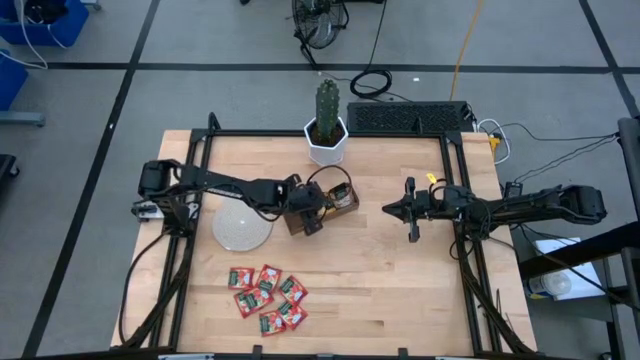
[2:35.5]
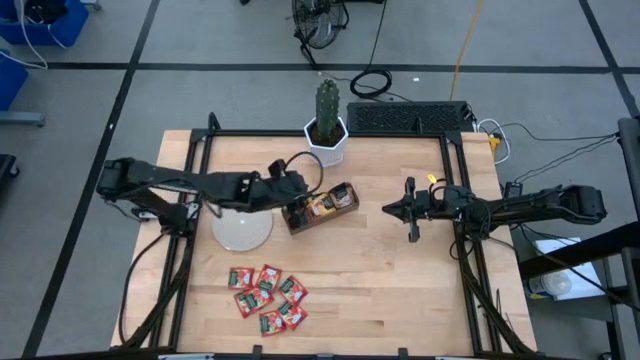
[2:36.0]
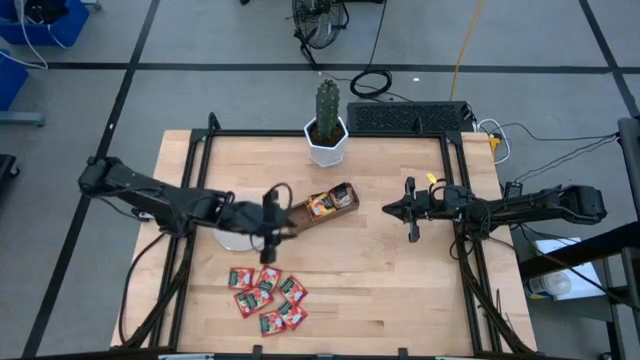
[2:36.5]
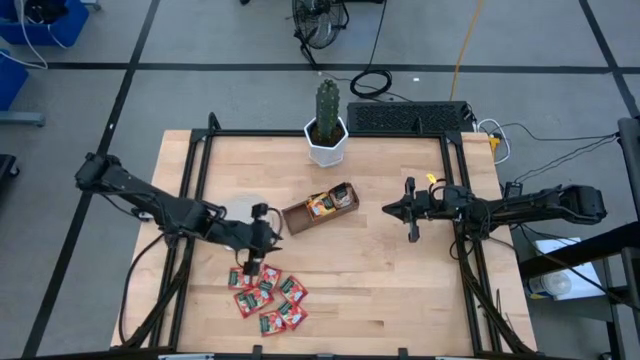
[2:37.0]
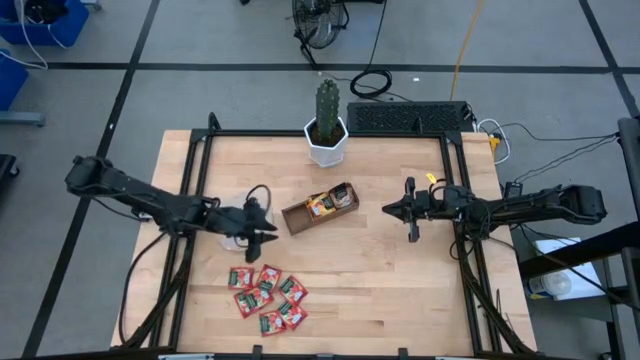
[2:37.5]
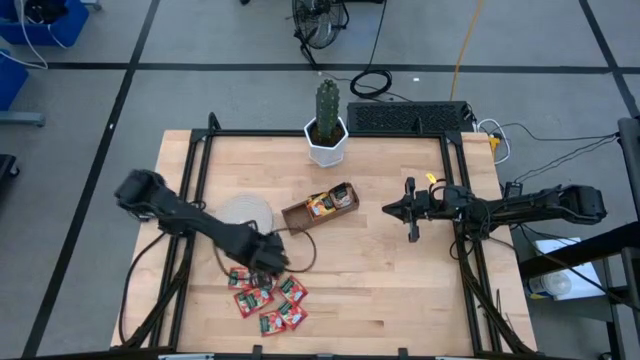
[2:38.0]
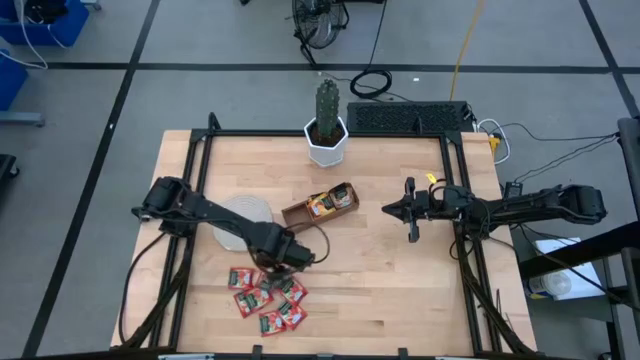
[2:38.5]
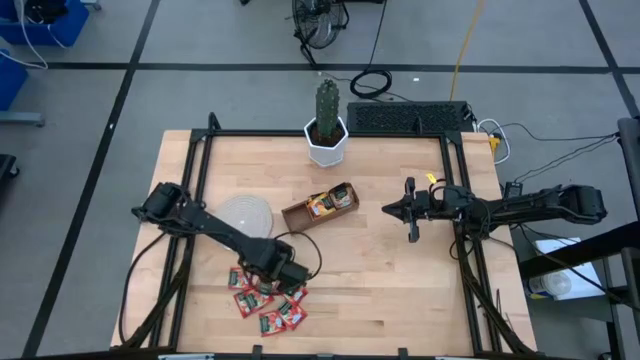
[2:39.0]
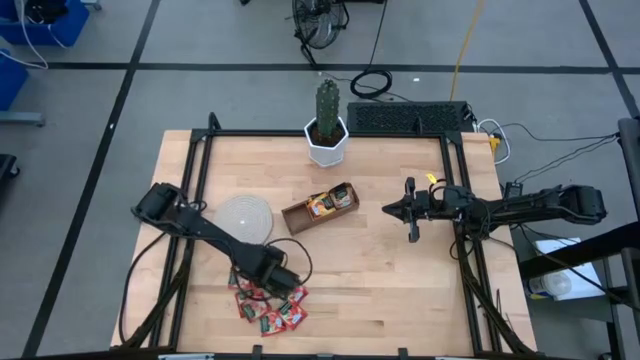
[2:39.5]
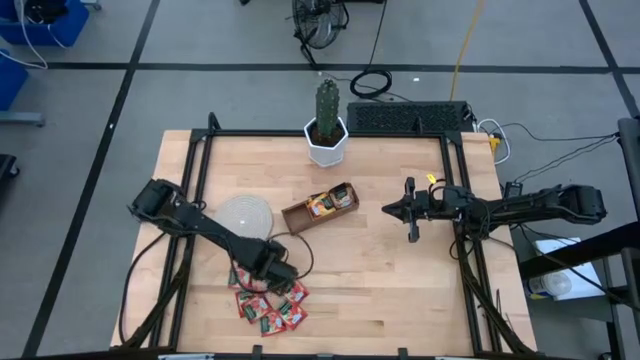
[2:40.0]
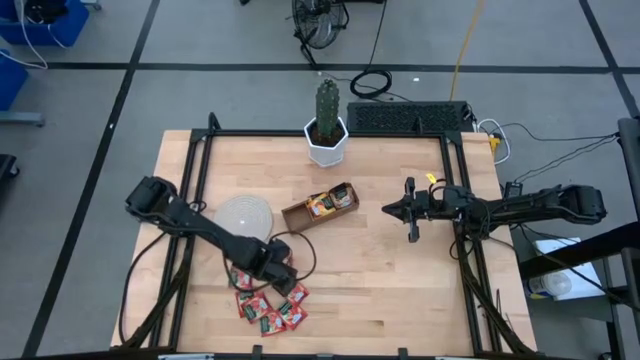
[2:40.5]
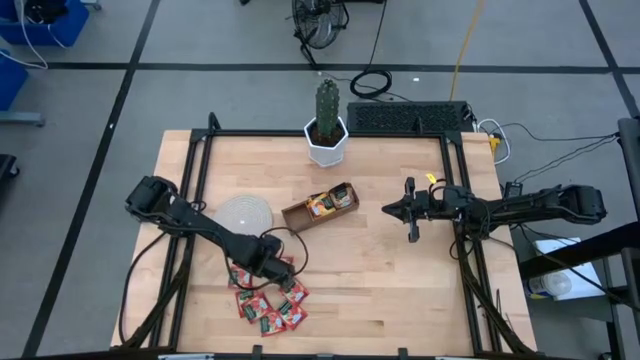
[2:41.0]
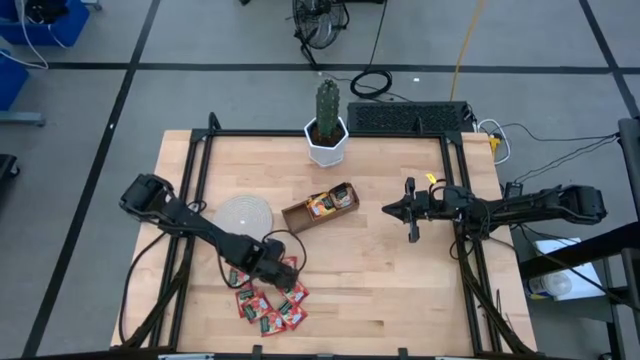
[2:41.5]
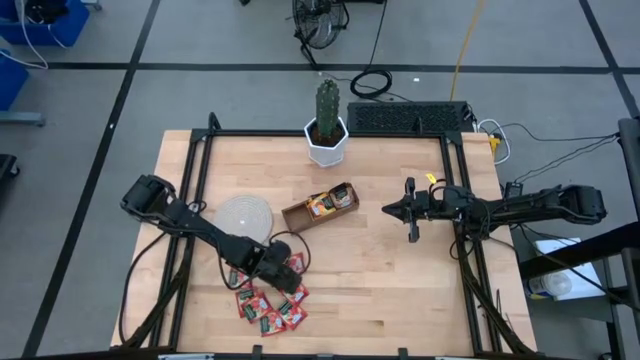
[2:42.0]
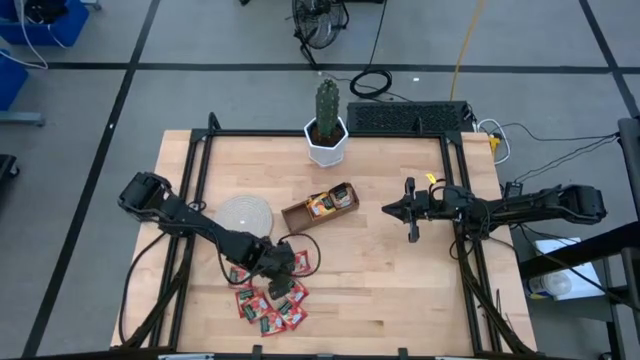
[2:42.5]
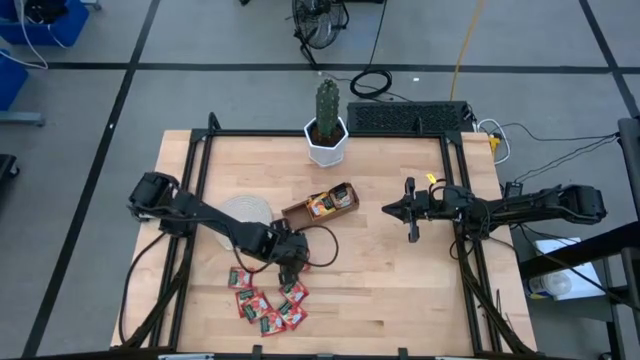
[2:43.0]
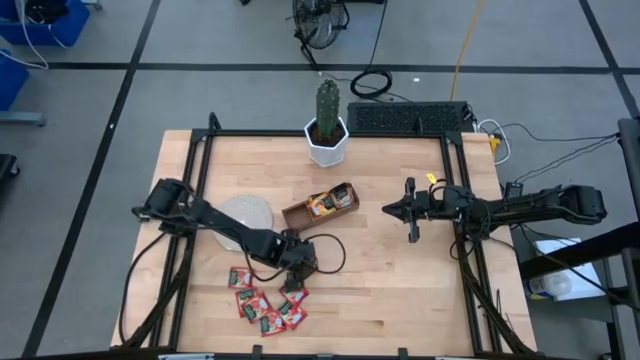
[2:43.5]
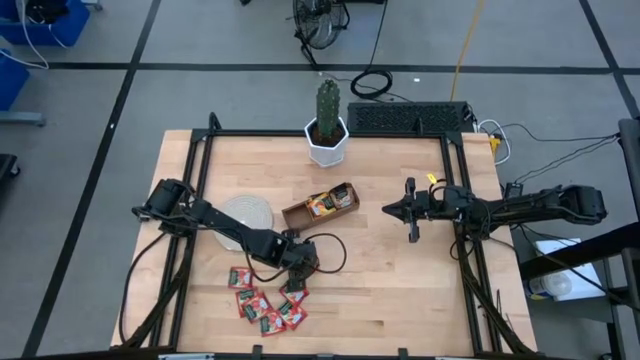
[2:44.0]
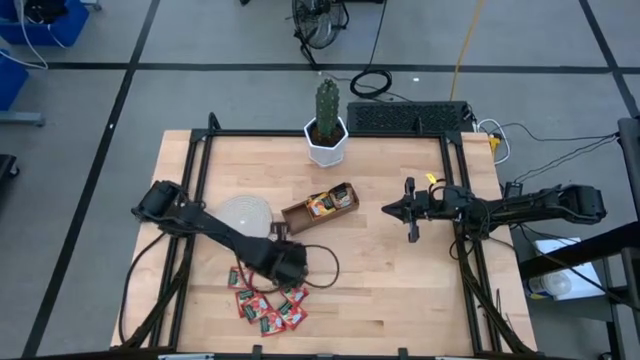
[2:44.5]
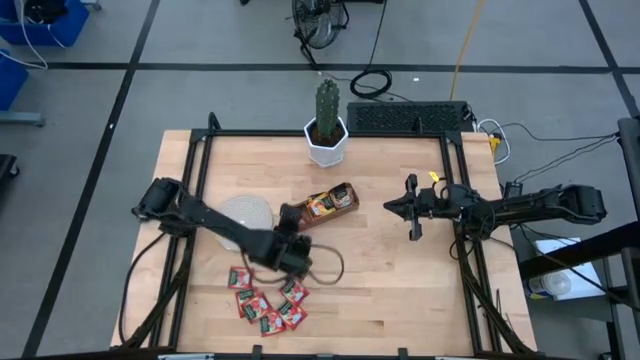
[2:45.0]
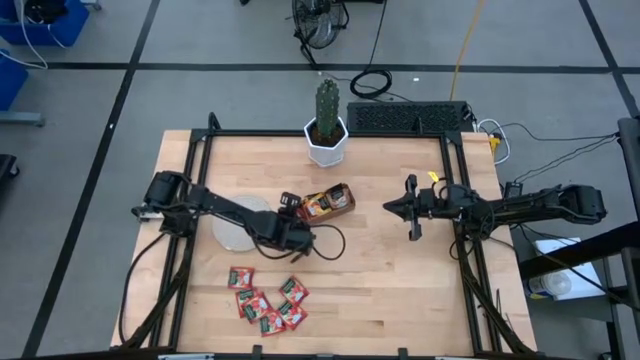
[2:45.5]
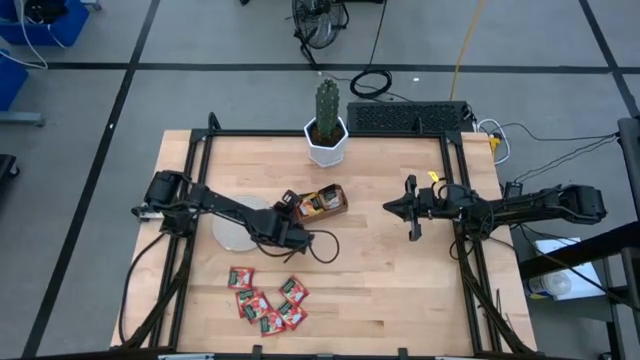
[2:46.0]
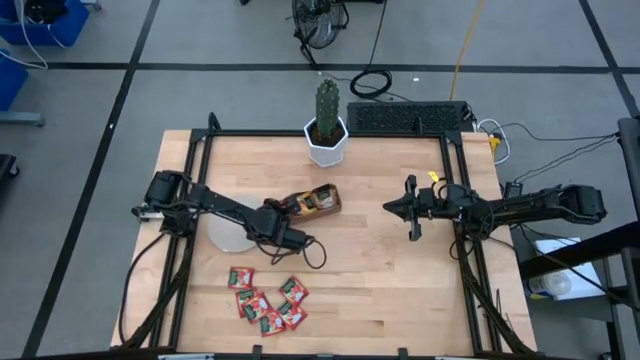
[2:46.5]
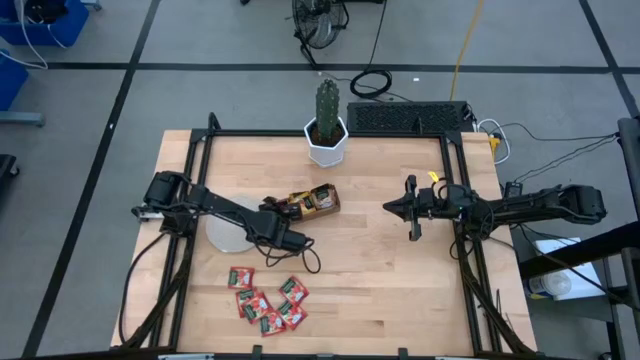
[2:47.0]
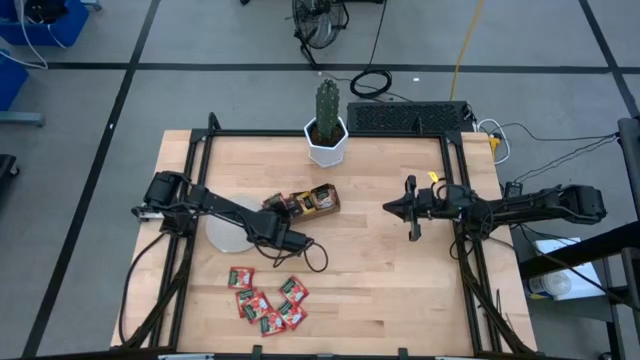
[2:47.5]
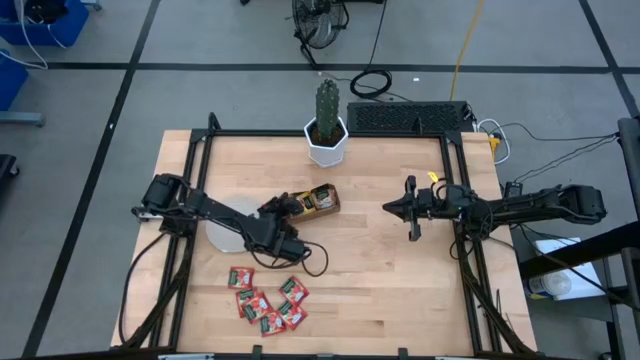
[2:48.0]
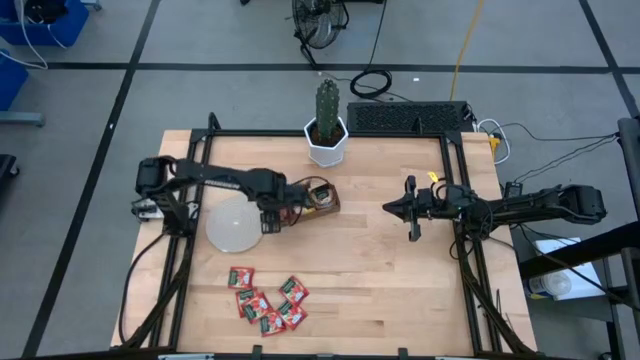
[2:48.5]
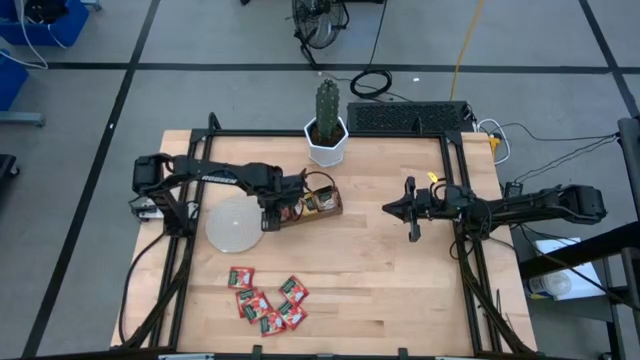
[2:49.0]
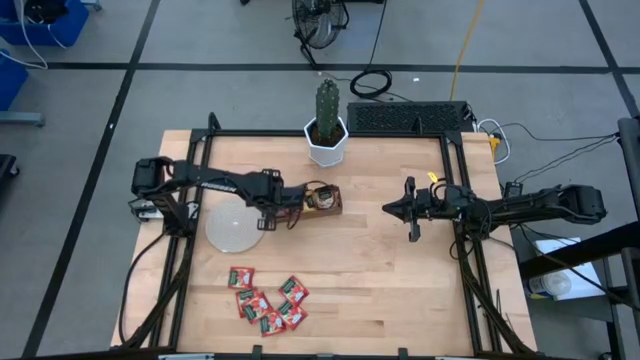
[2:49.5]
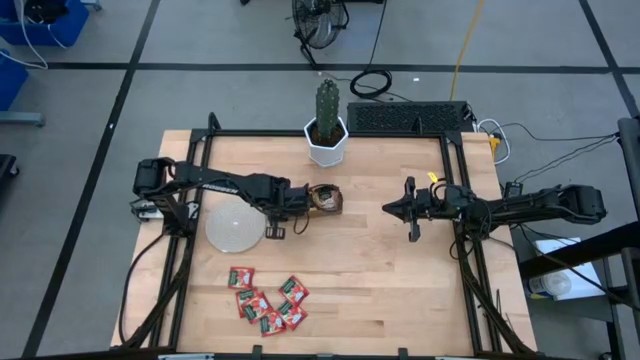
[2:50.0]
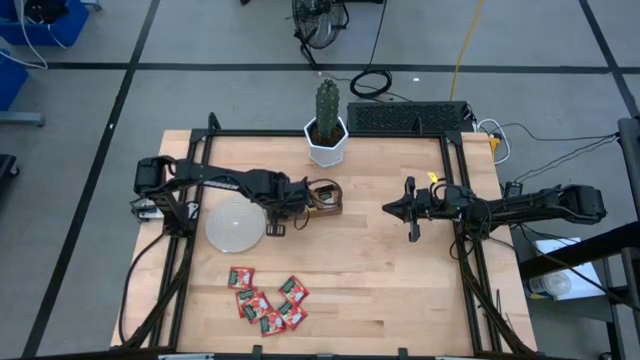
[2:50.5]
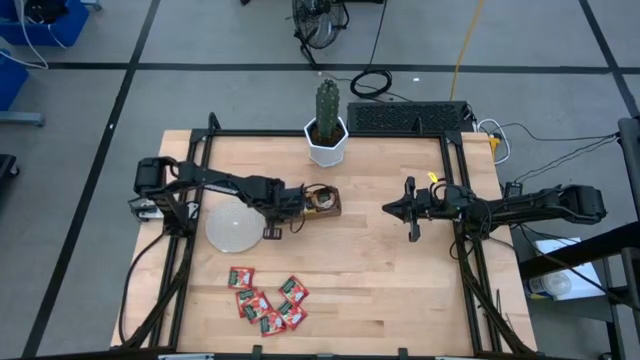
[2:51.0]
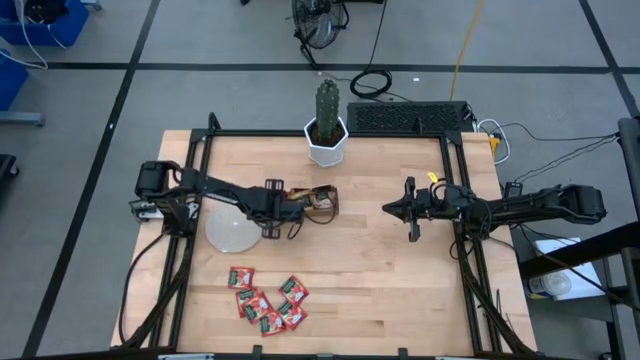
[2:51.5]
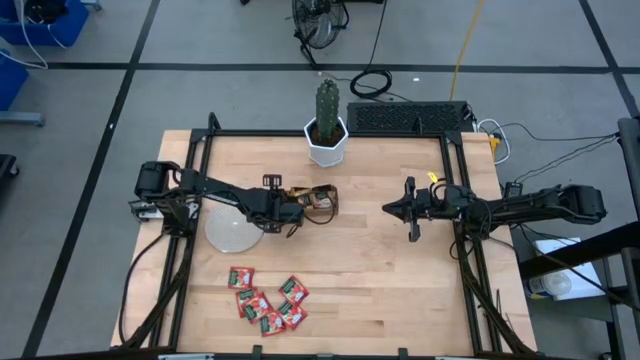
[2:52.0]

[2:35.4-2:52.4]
Task: Pick & Place Tea
Put the red tea bag into the left section of the wooden organizer

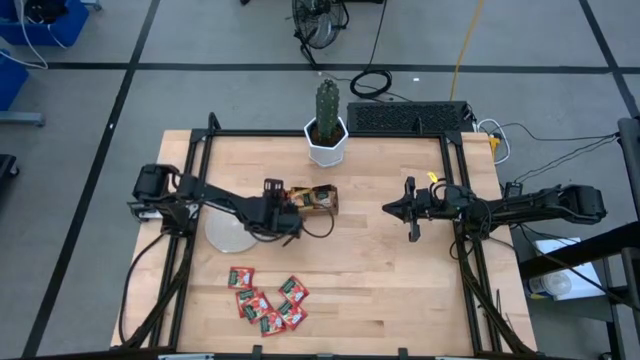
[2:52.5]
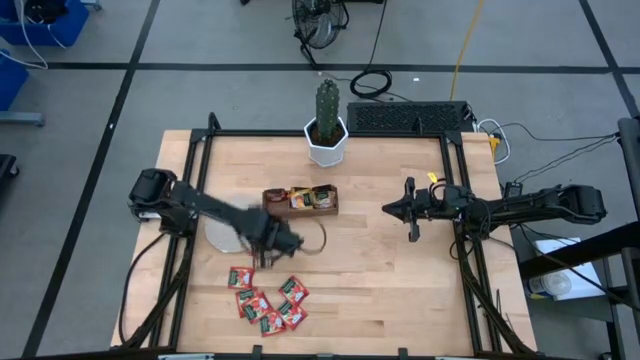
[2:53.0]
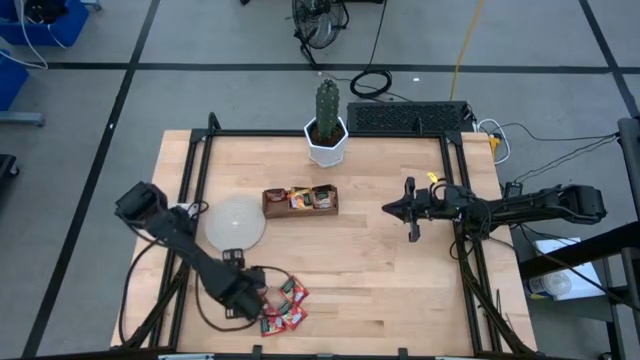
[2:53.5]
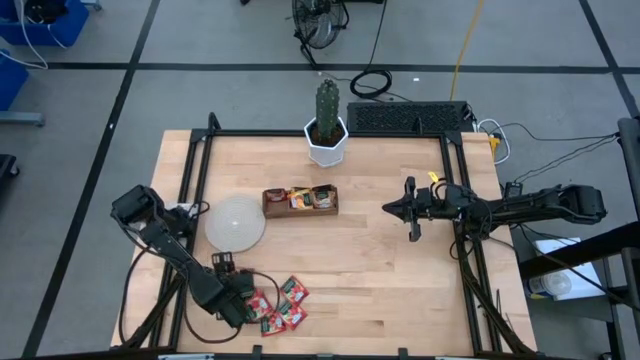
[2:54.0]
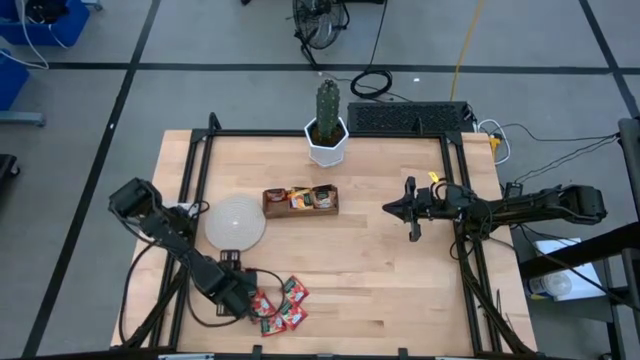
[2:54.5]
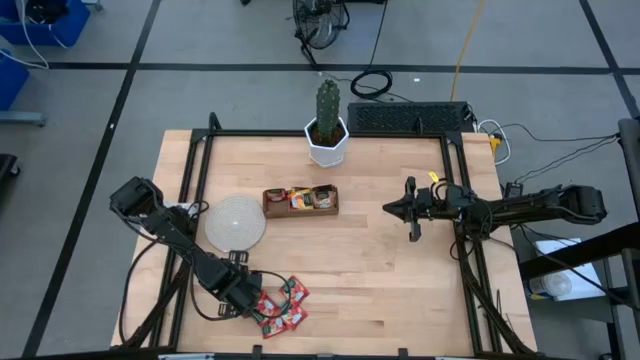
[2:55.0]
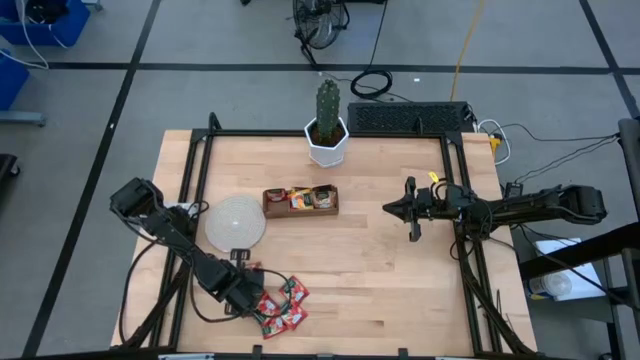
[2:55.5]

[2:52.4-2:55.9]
Put the red tea bag into the left section of the wooden organizer

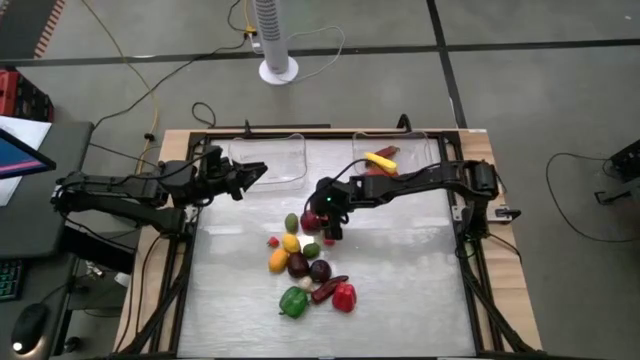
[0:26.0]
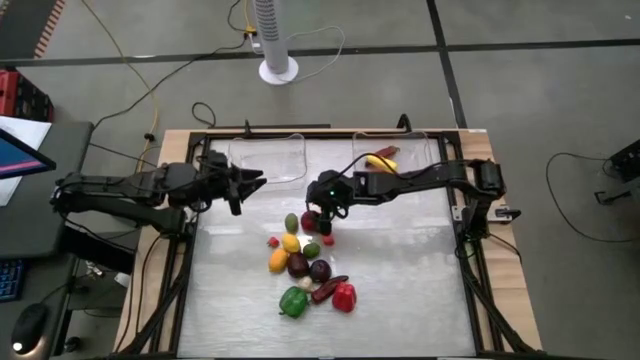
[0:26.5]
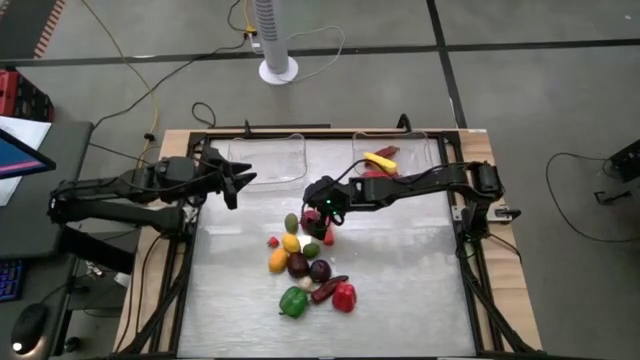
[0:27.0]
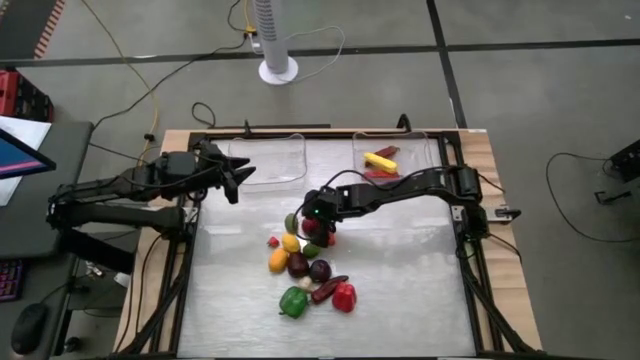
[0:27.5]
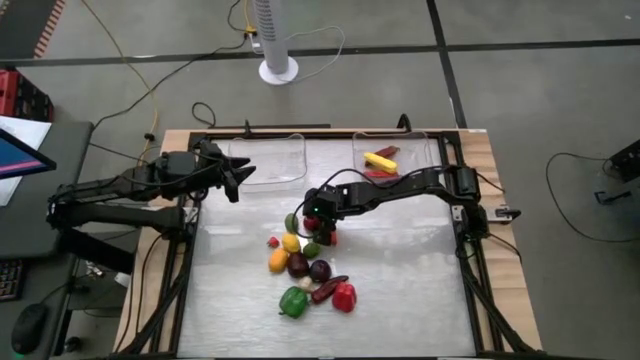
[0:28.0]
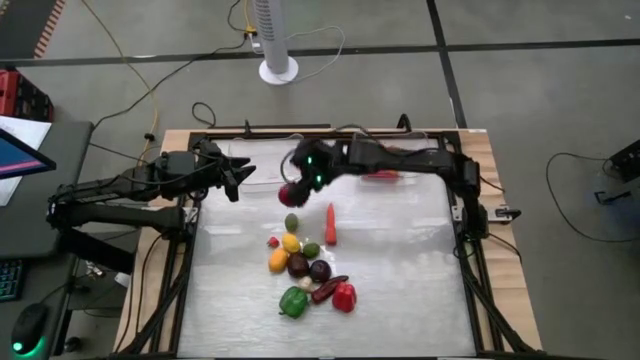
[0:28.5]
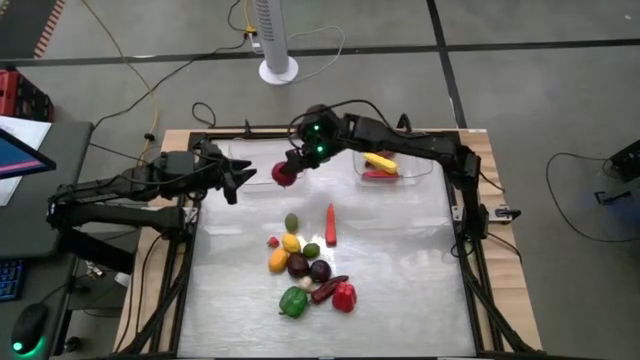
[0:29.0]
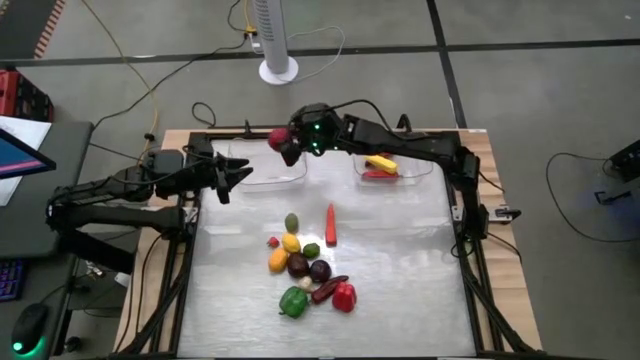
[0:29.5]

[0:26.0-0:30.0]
Task: Sort produce into baskets
Put the red tomato into the left transparent bin
